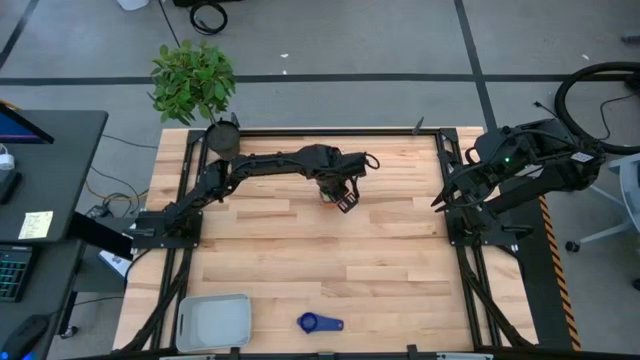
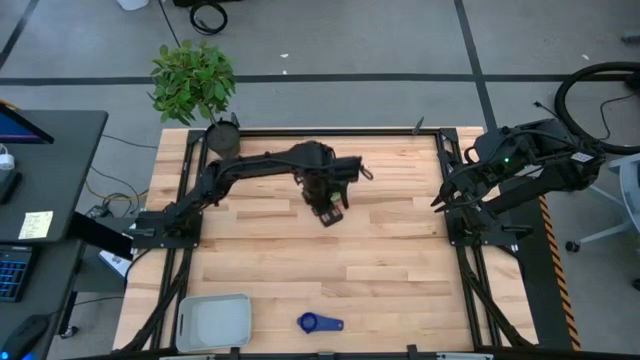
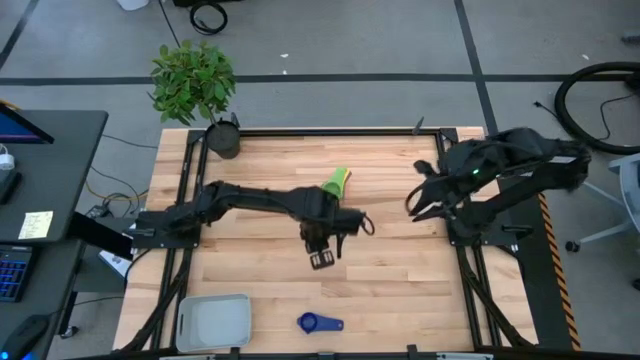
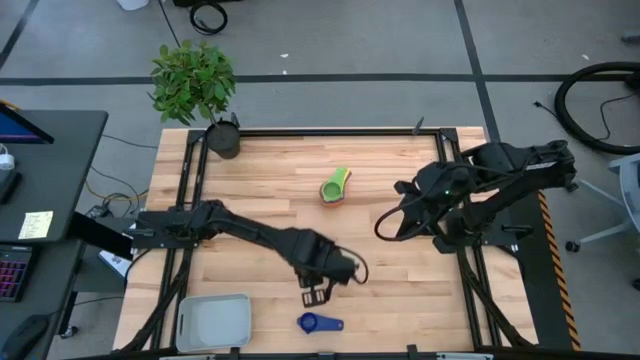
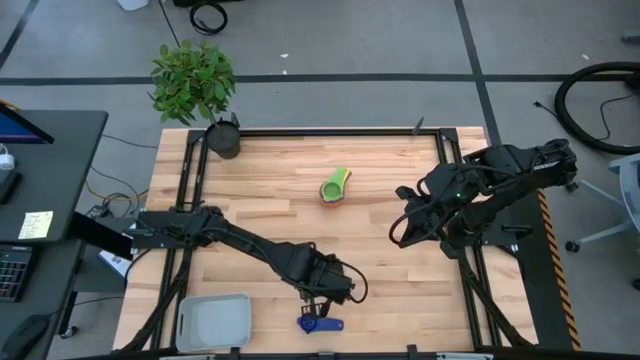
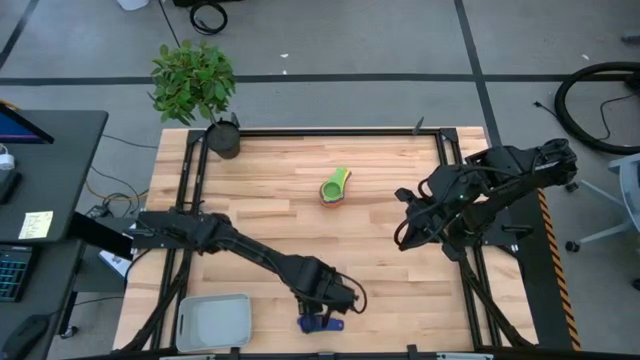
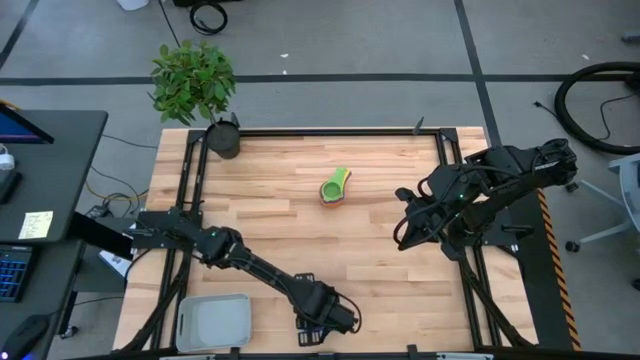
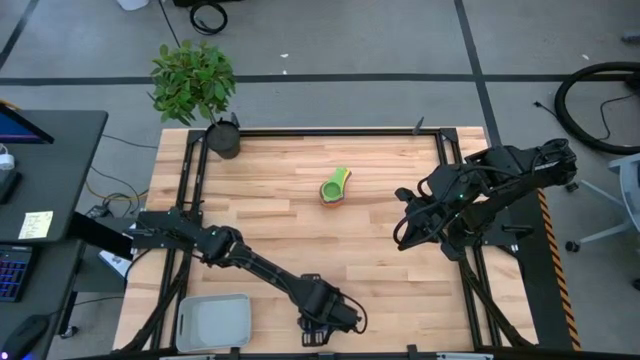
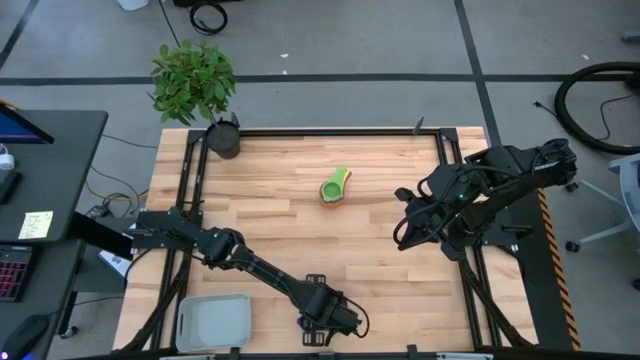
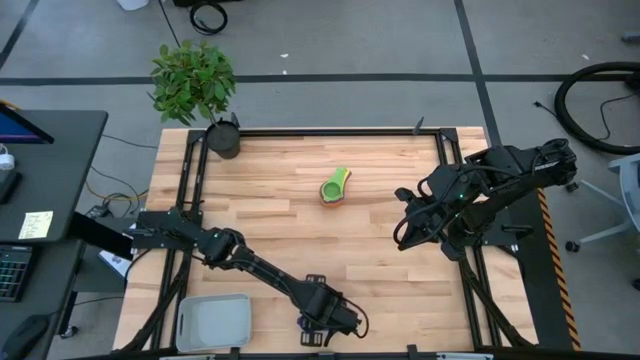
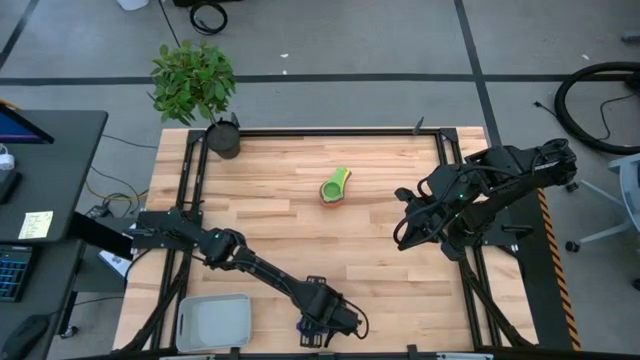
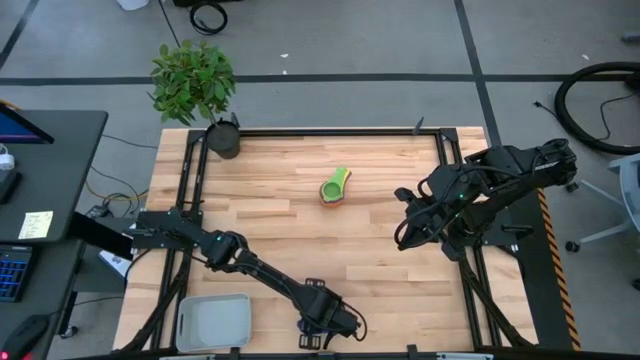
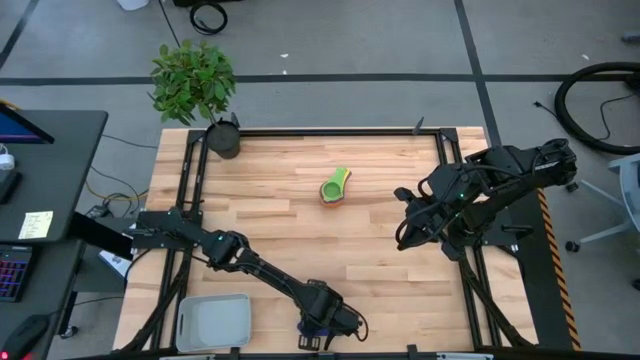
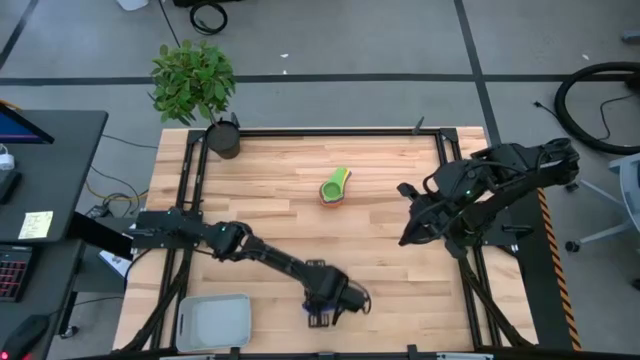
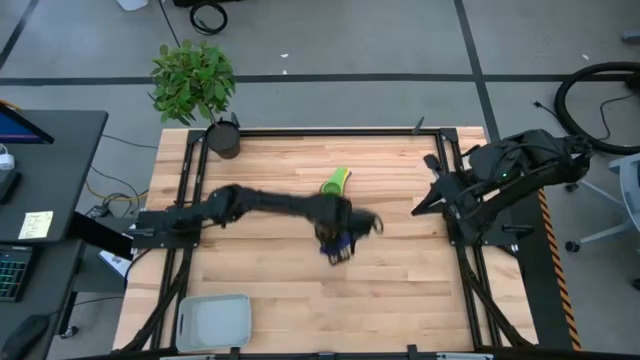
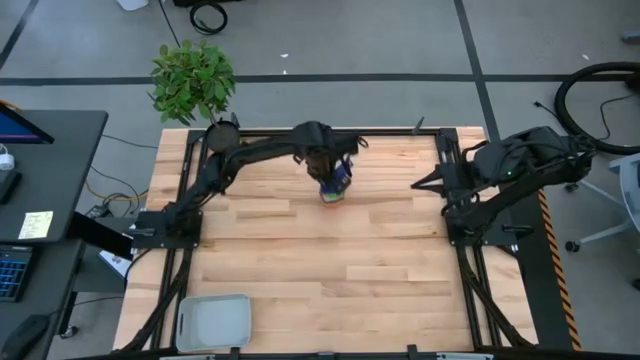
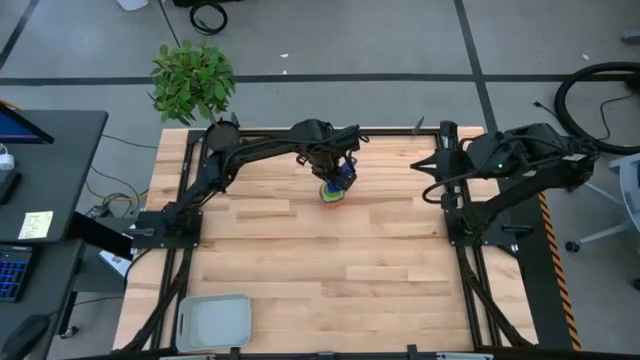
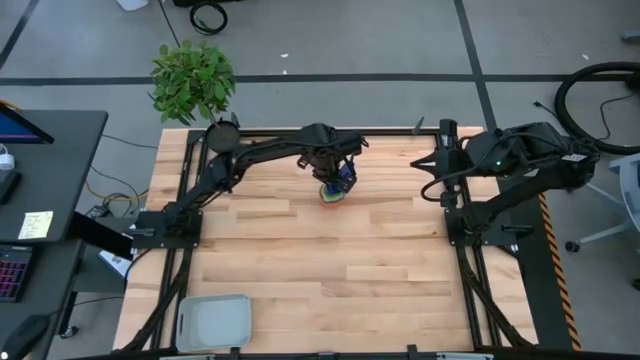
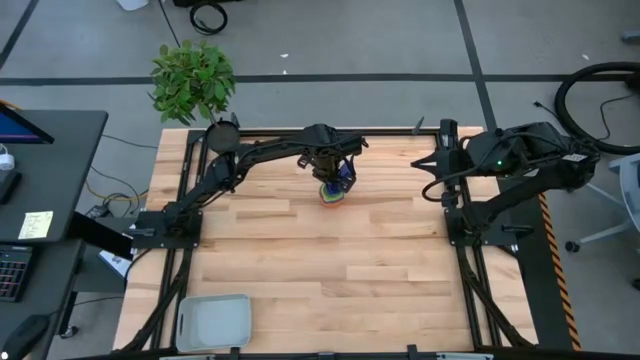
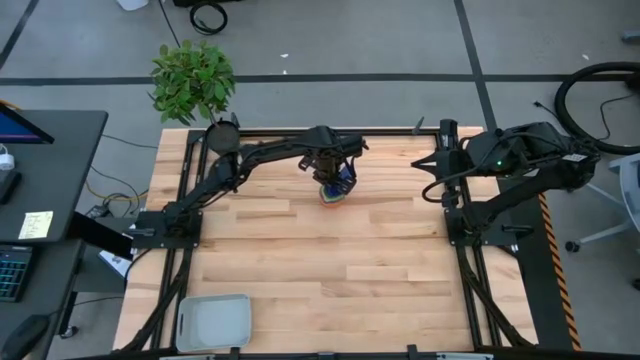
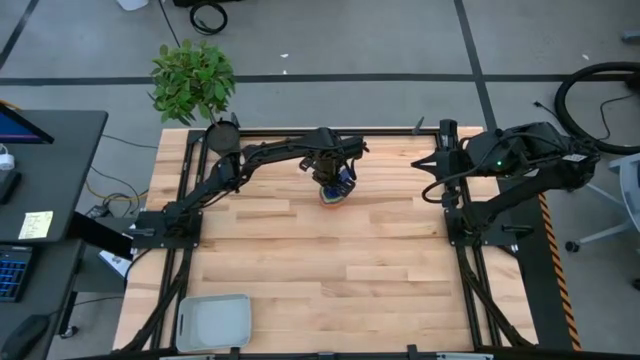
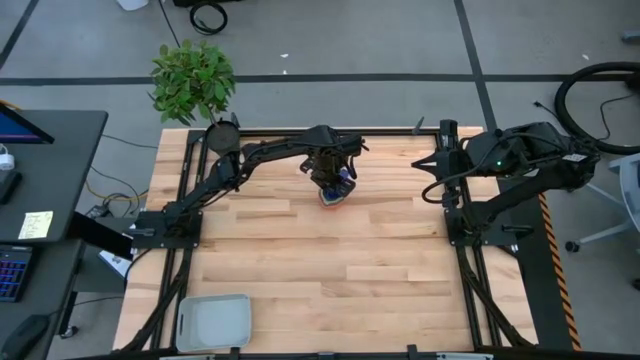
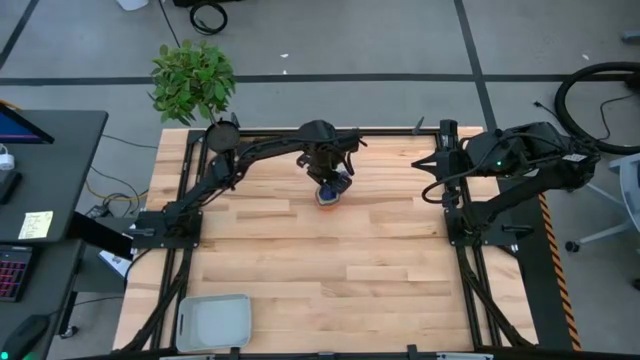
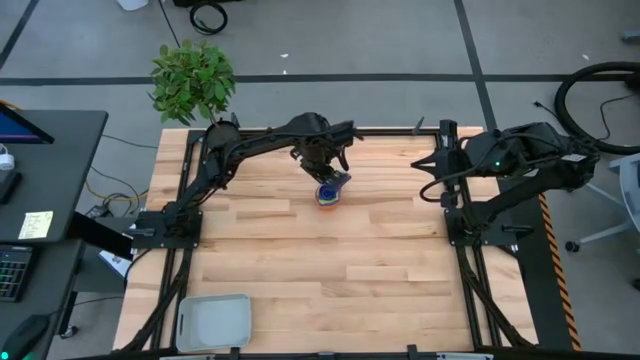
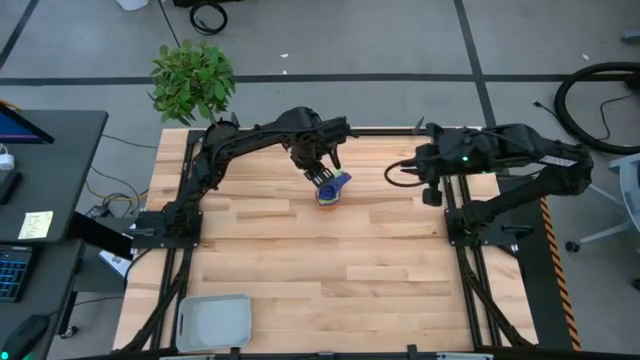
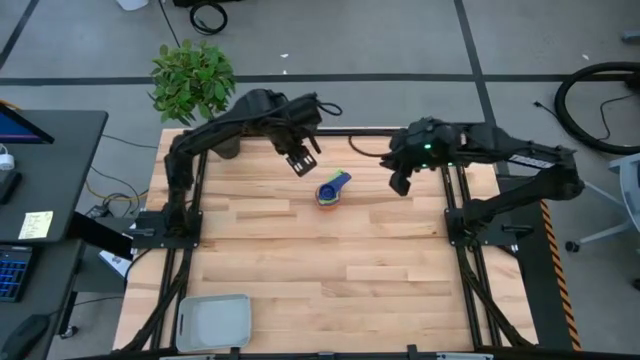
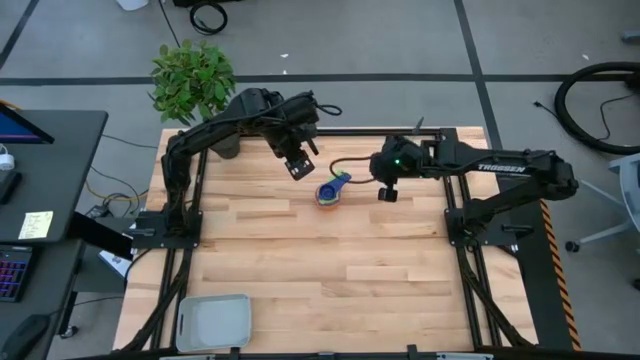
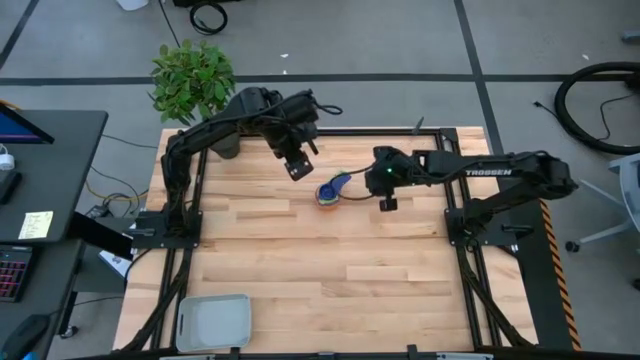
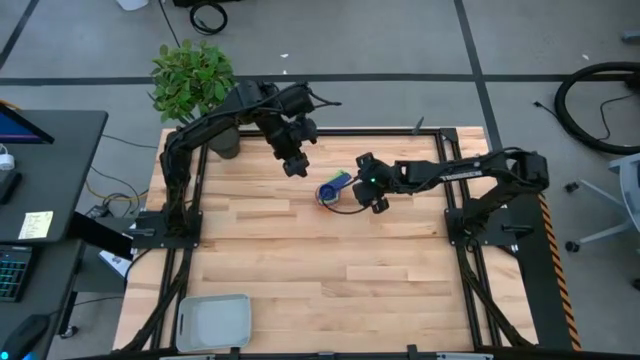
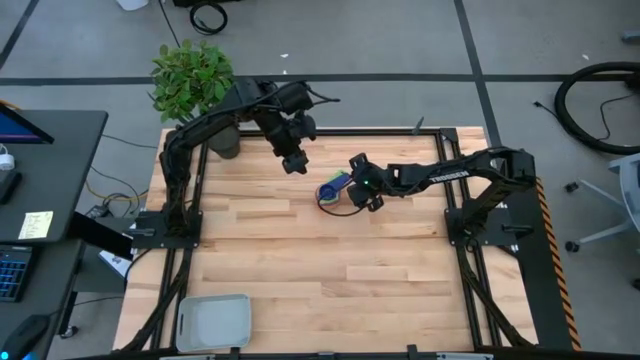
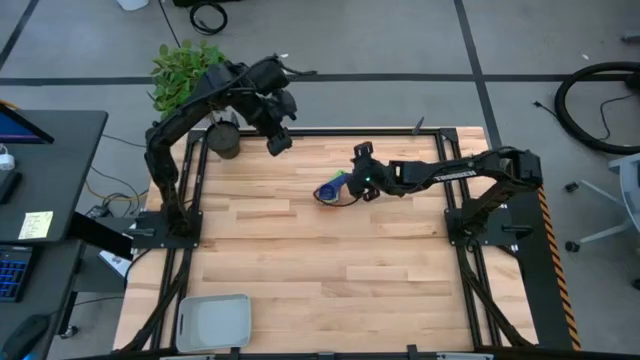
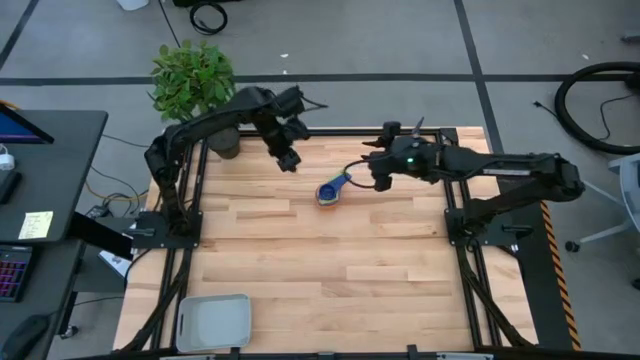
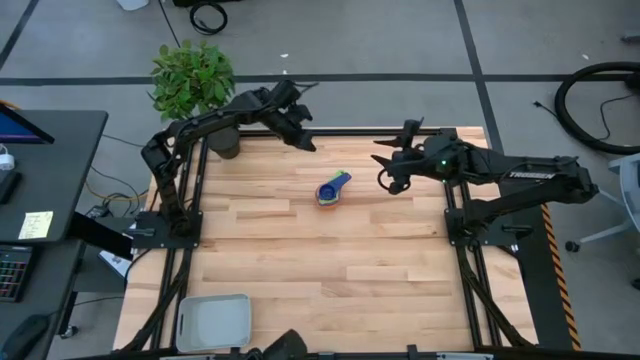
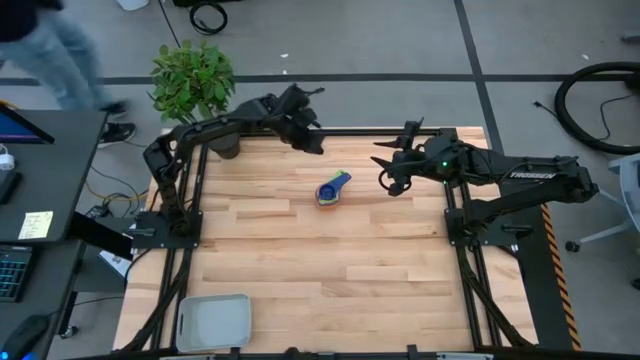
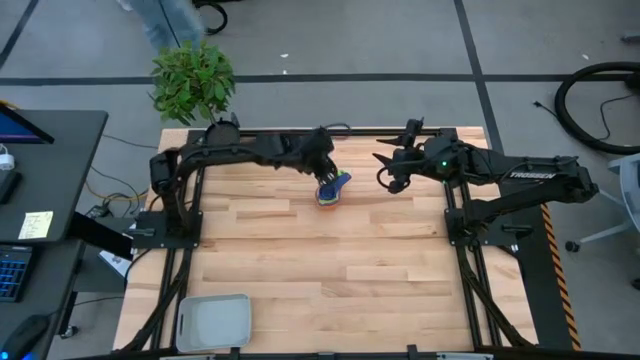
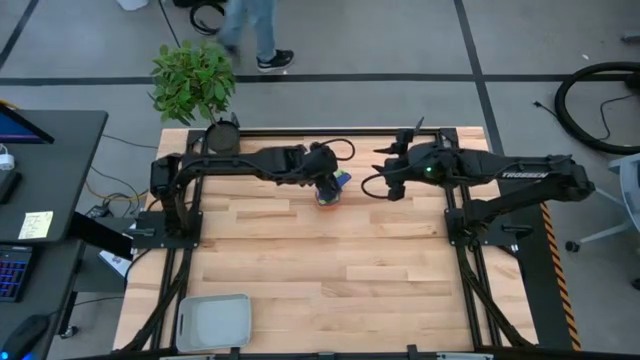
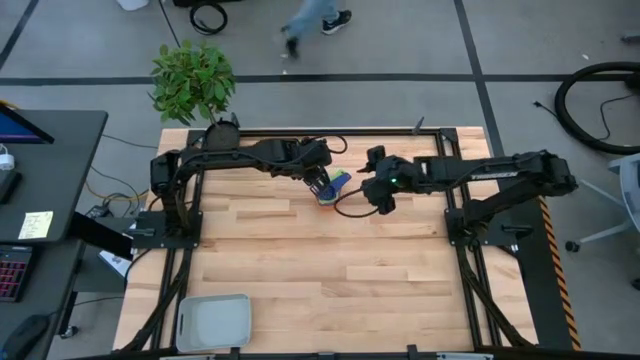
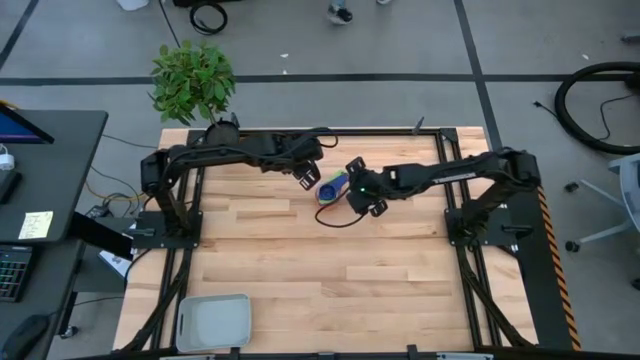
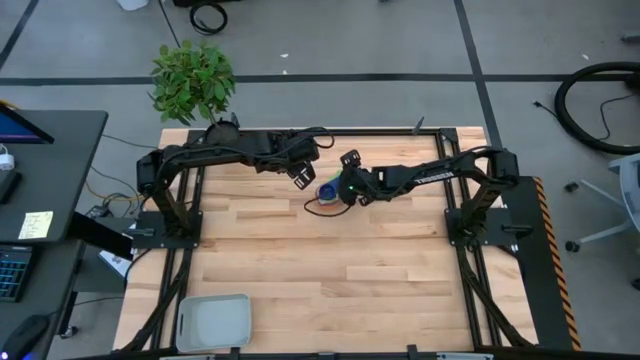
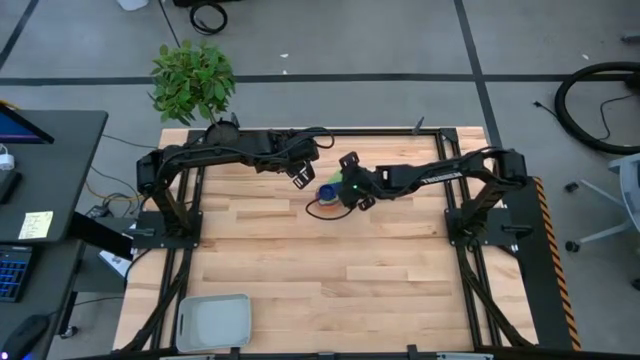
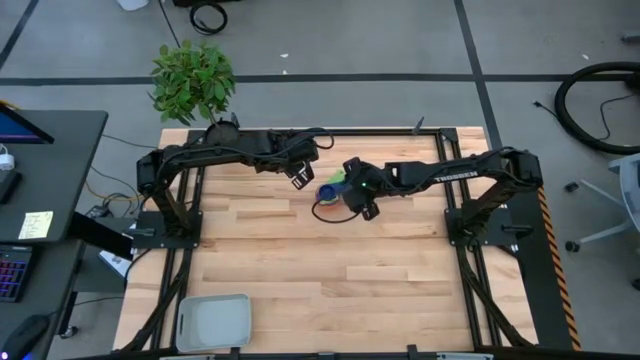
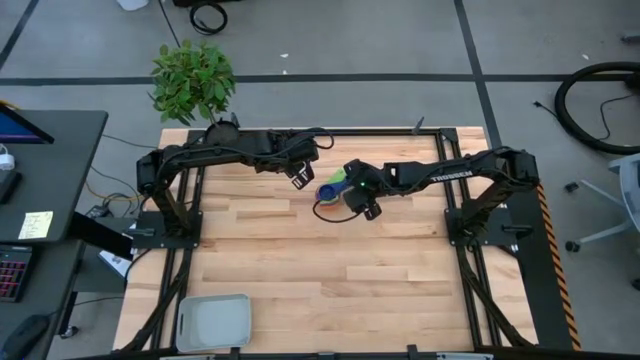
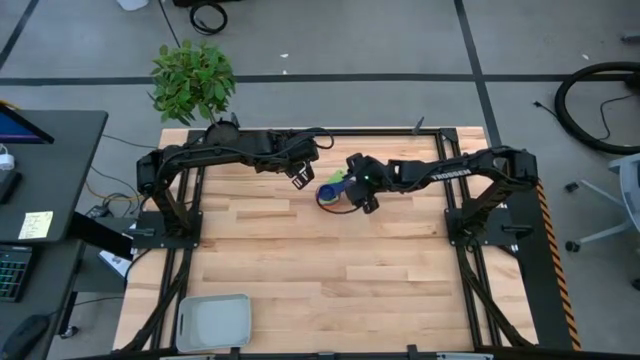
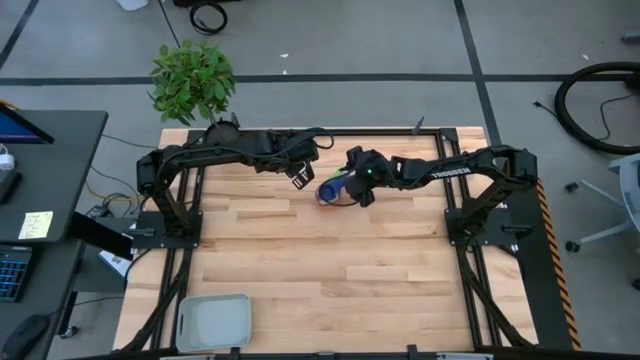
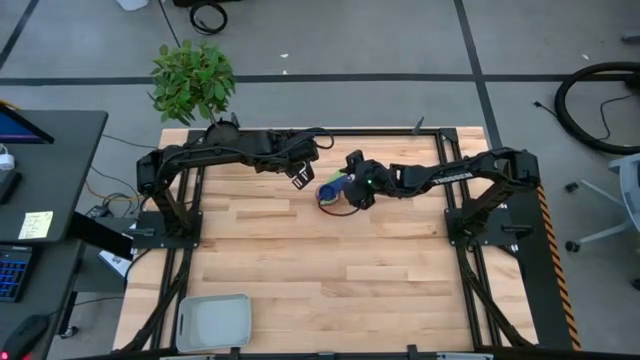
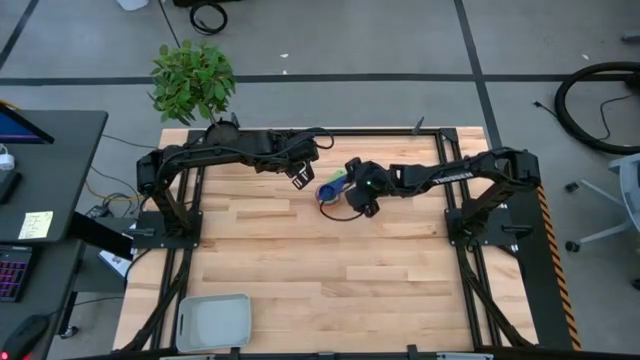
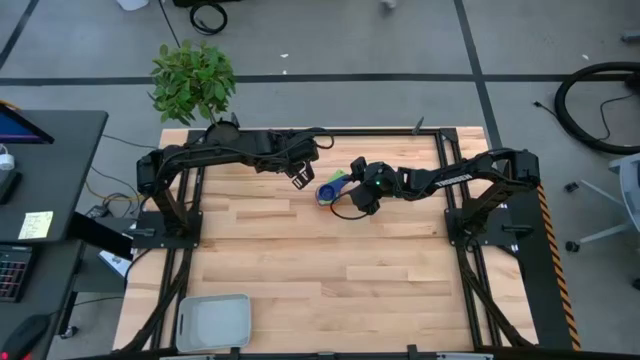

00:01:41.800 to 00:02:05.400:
Task: Nest measuring cups in basket
Stack the dark blue measuring cup on top of the green measuring cup
